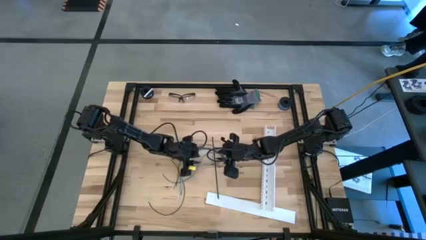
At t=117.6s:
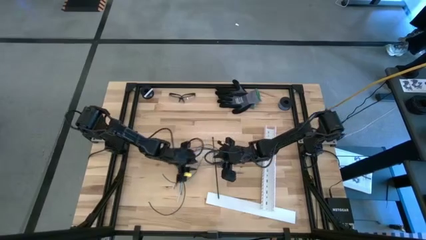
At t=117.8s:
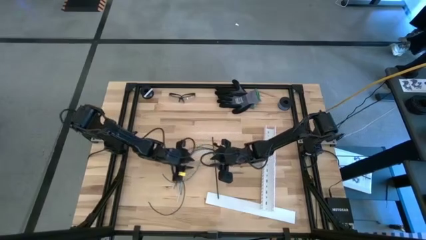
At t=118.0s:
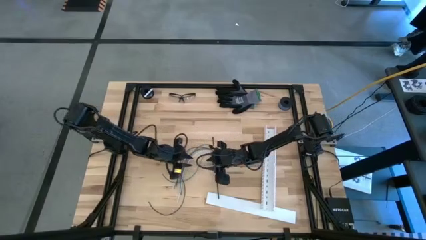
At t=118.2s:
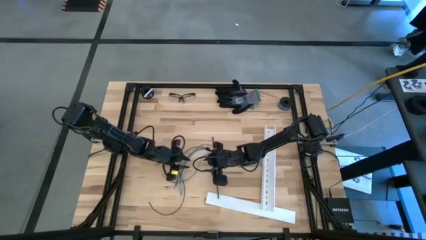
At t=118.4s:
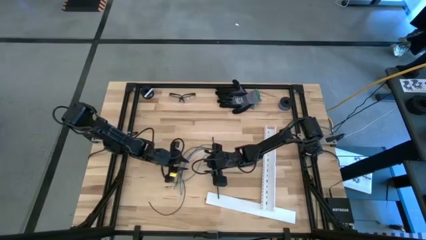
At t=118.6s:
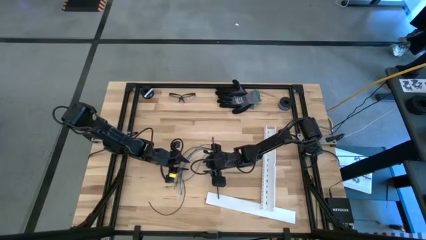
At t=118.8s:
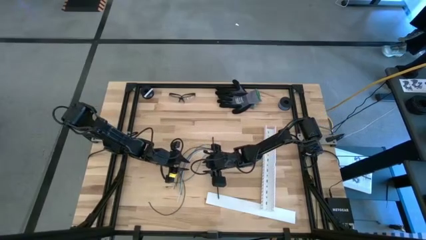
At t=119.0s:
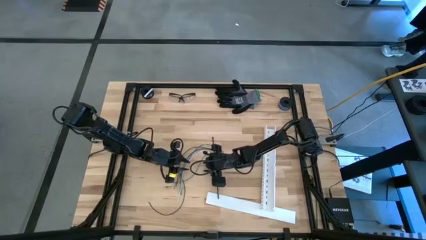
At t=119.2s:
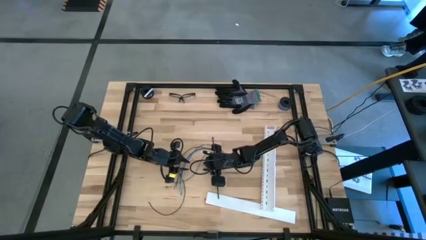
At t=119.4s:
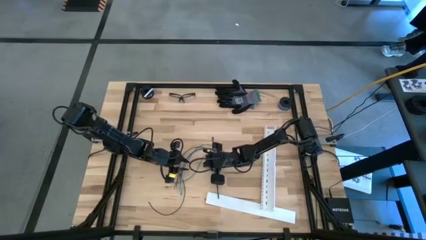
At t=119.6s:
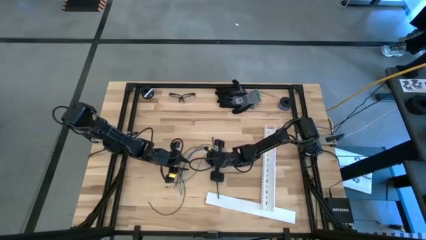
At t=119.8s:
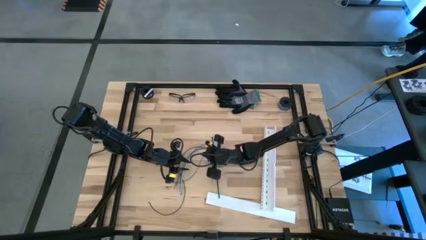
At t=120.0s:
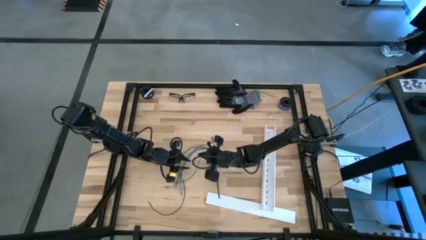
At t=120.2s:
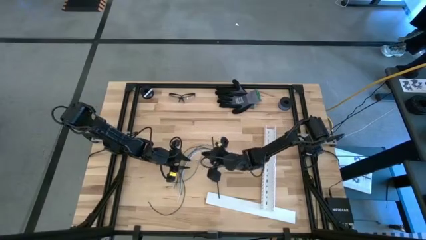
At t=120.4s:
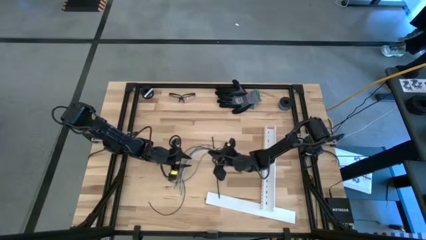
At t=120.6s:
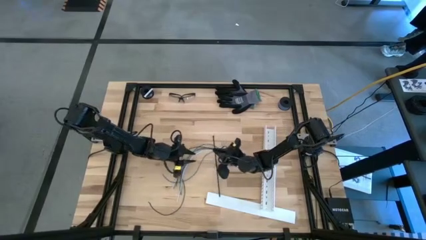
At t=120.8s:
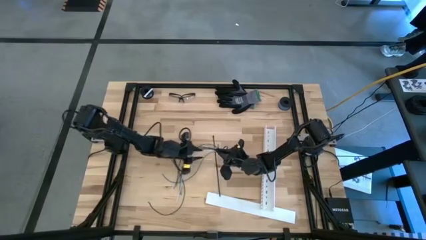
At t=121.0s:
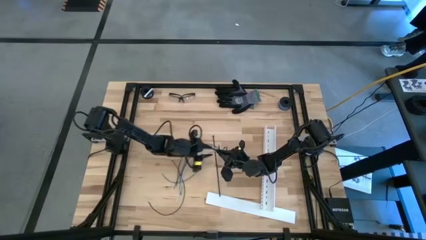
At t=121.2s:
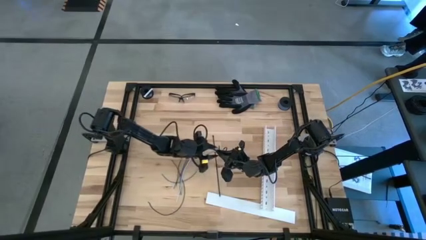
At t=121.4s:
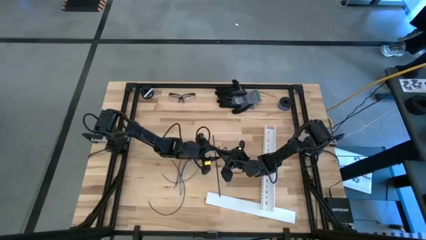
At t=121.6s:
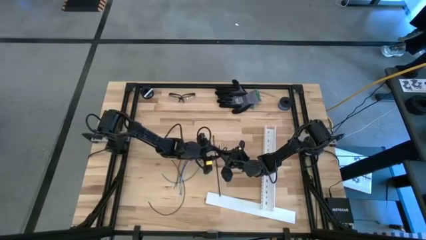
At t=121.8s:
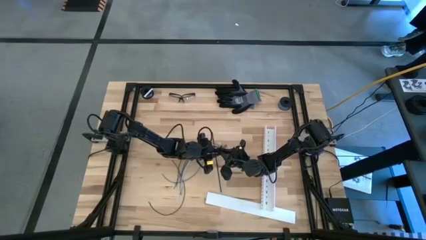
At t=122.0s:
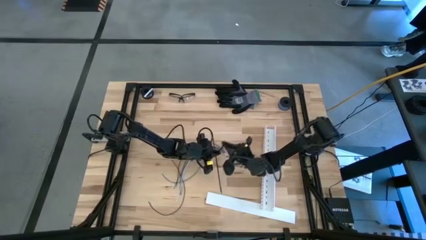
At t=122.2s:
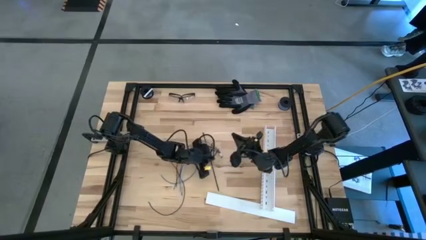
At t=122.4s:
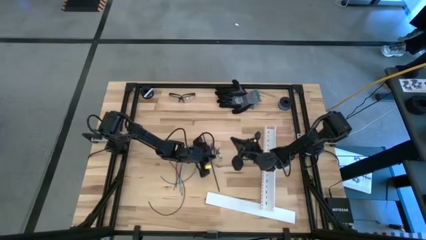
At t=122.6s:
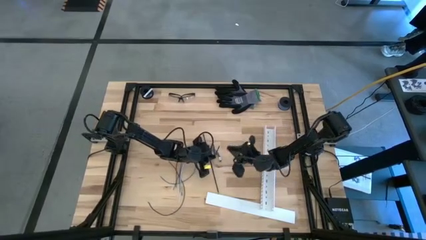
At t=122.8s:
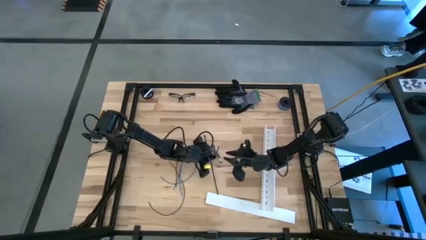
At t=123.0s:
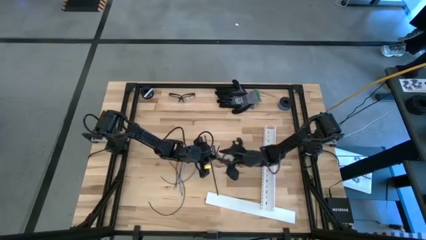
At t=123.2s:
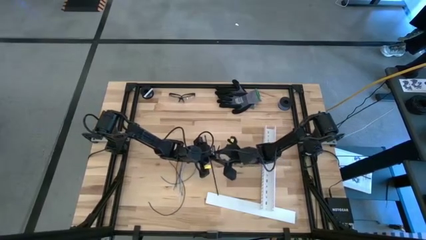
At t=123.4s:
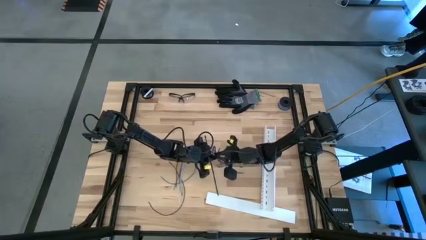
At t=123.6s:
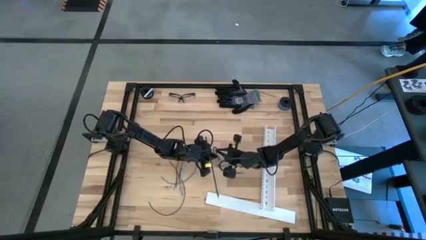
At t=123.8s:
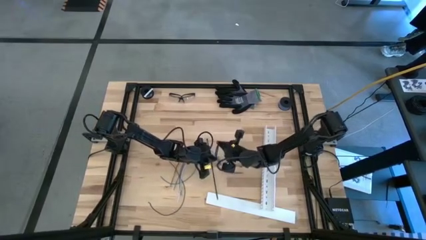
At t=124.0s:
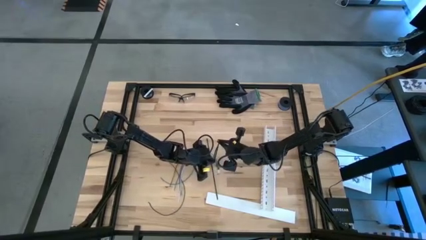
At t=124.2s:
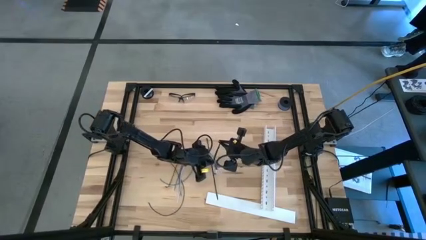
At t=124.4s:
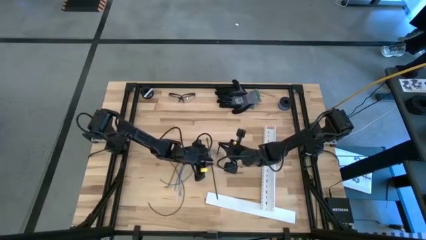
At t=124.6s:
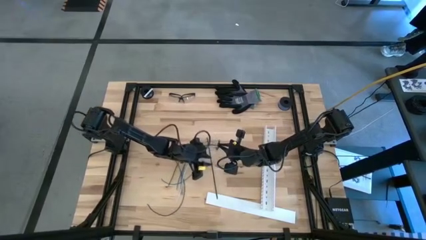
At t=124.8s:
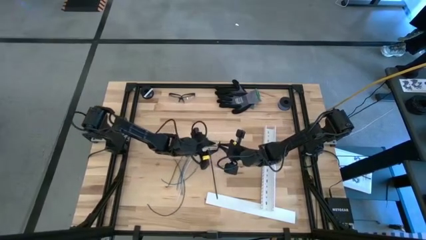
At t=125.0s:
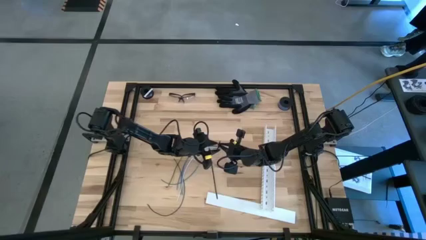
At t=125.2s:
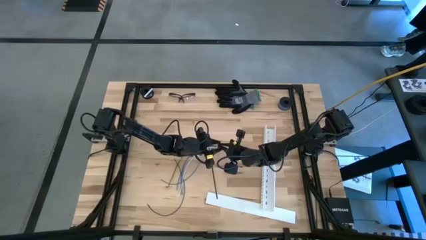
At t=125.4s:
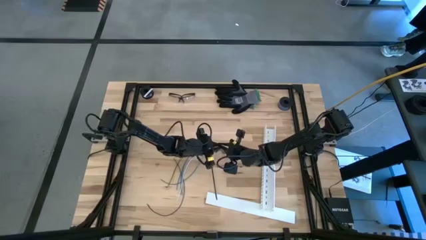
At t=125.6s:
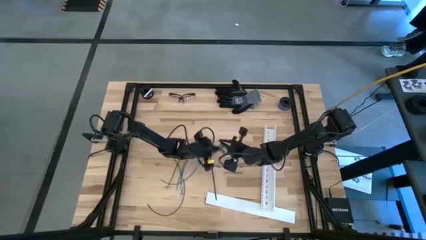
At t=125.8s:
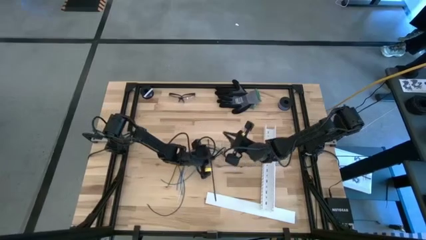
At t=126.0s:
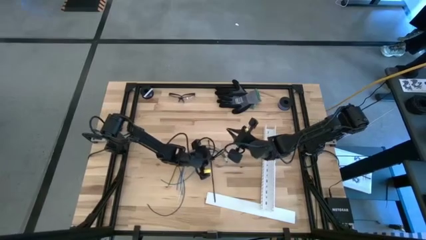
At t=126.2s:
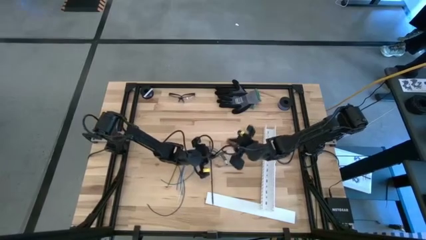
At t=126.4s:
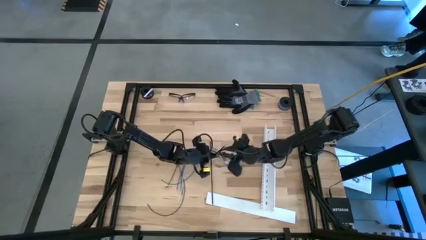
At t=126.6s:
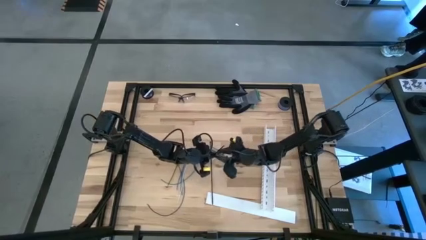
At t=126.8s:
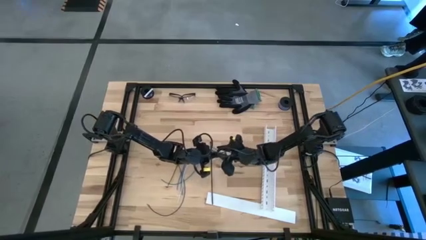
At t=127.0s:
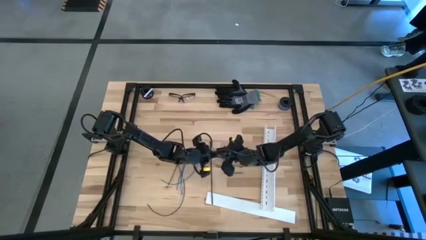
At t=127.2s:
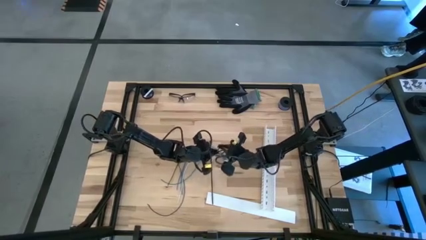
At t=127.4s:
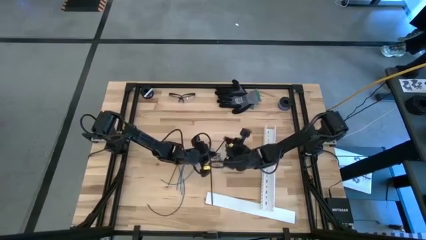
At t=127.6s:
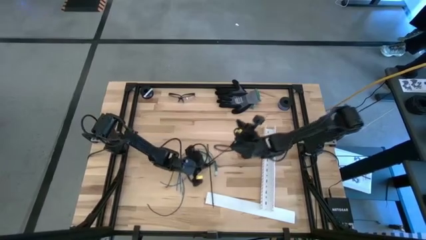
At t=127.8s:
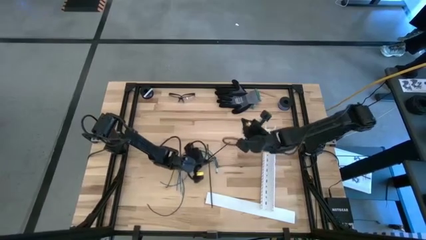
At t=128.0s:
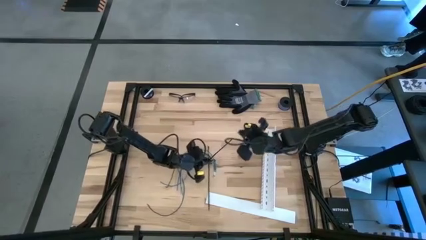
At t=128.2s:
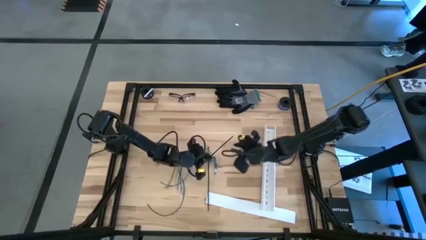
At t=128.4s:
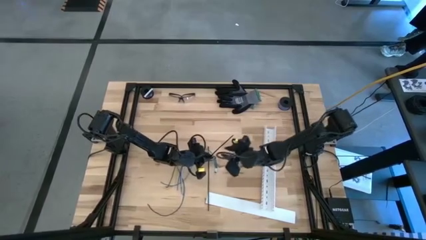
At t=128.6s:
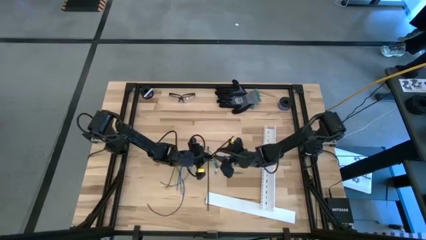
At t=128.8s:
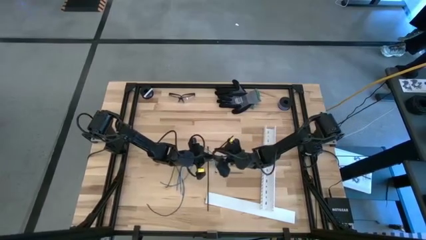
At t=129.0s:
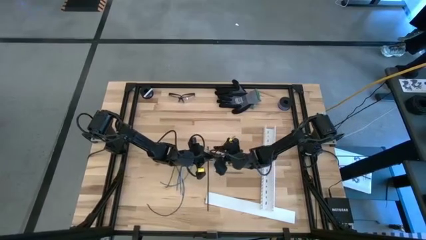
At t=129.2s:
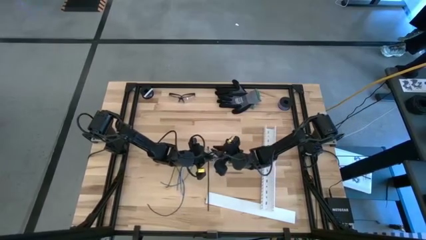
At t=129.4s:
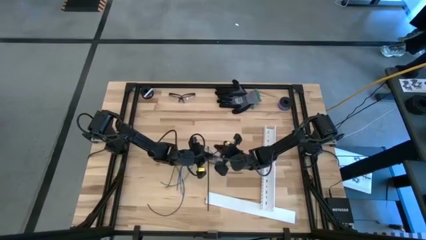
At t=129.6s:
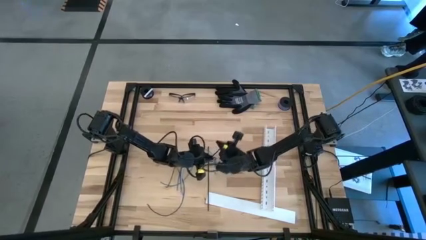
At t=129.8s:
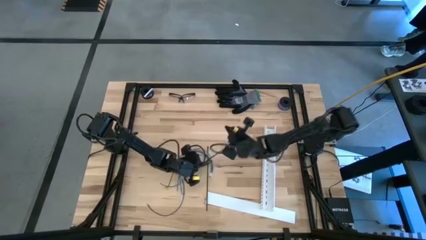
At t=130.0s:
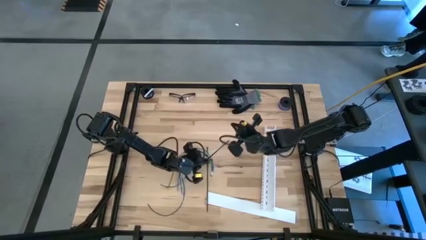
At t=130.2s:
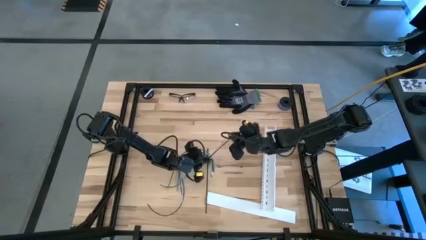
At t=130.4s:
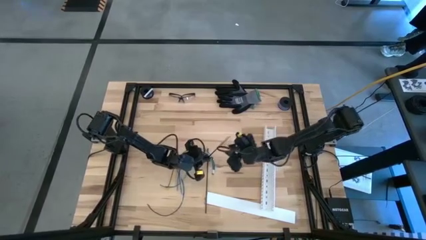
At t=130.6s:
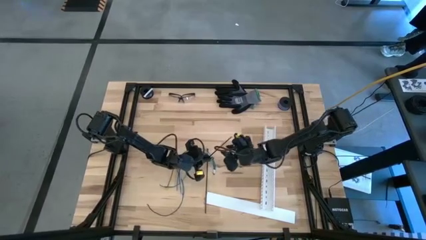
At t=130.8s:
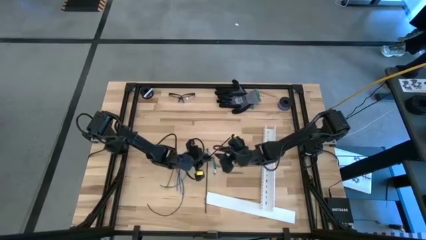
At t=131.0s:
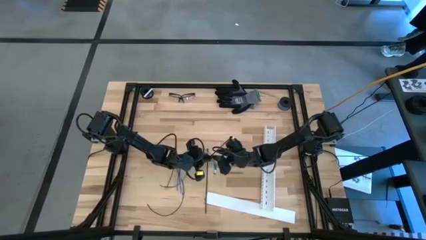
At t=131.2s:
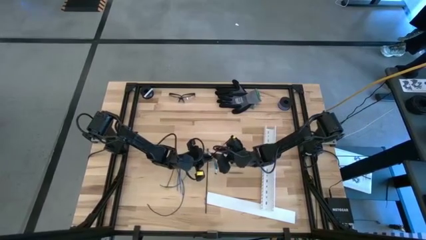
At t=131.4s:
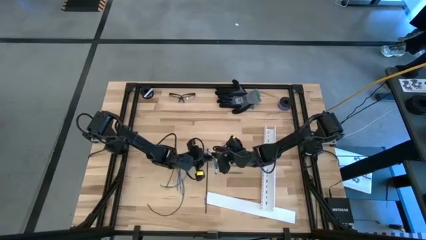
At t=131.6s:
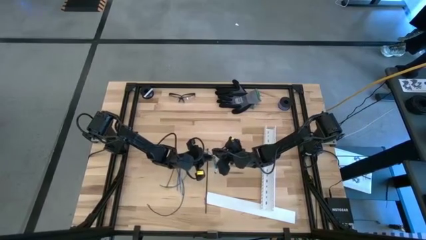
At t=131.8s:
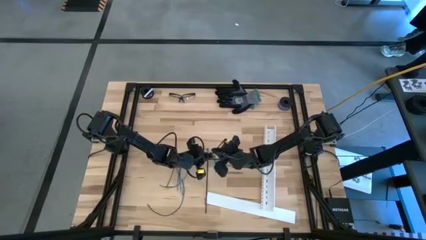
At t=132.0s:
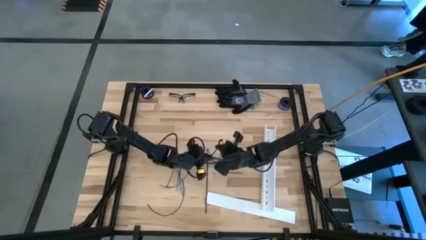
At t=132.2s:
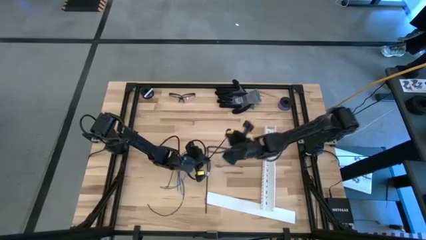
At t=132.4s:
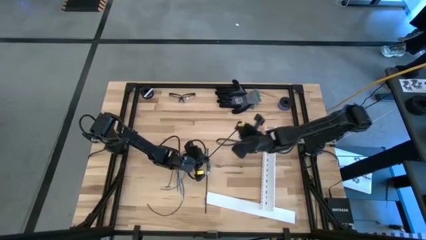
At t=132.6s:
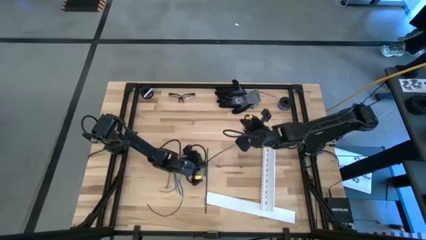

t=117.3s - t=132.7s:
Task: Ziptie cables
Wrap the cable wires with the black zip tie

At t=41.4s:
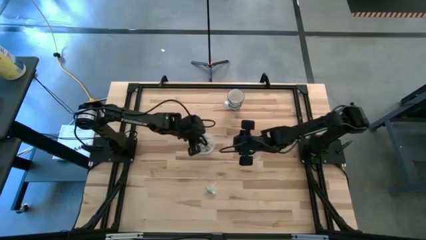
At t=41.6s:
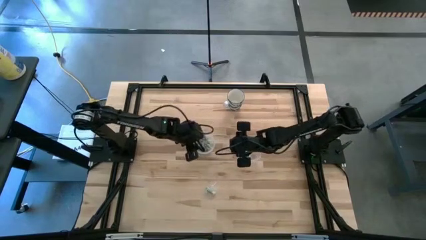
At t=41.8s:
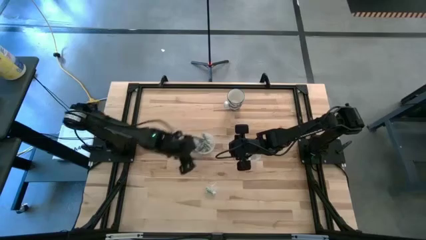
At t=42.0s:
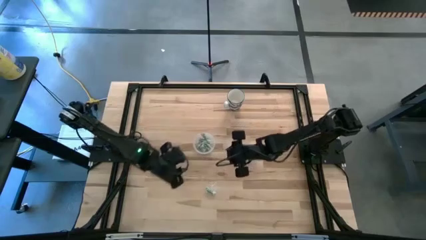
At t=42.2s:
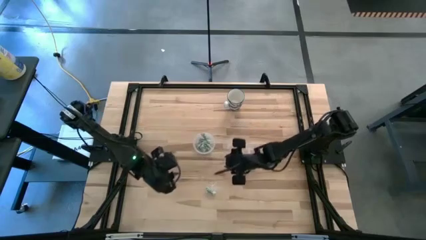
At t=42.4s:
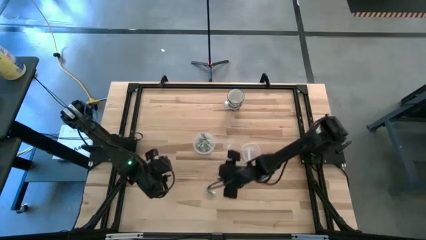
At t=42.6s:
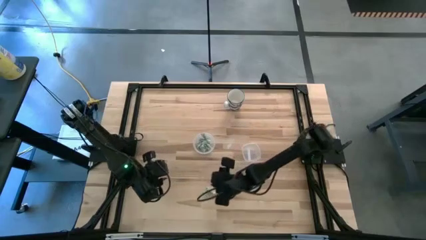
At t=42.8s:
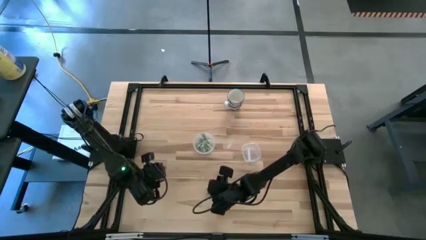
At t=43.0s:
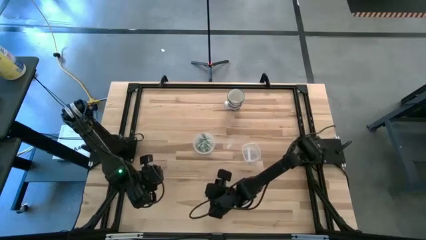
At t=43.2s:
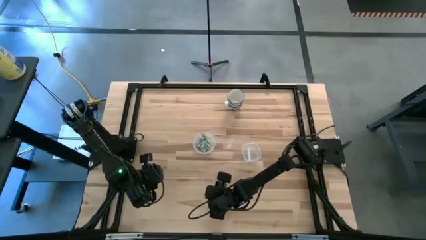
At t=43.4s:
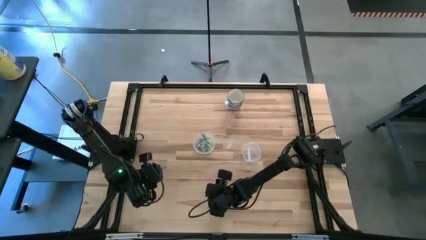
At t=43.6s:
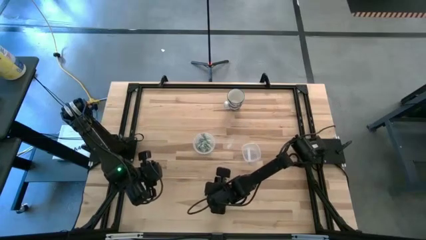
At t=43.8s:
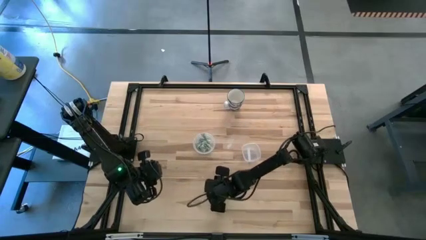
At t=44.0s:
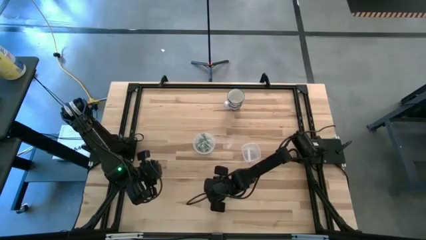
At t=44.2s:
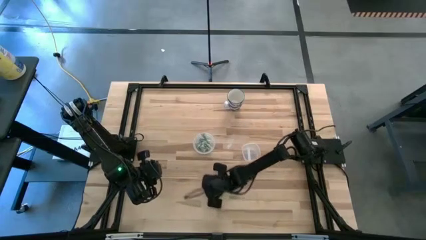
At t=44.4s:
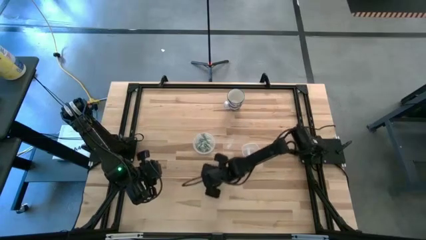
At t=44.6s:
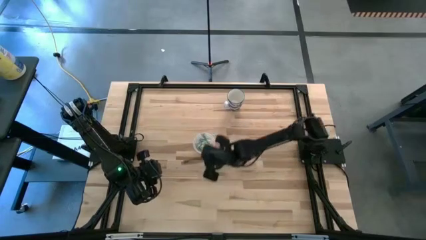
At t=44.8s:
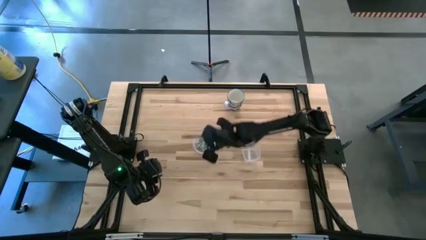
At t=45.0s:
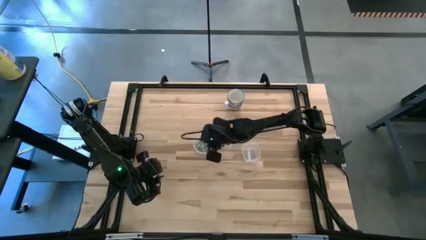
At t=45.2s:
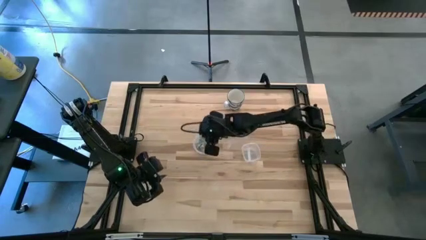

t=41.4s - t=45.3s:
Task: Pick and place Stevia / Truvia into bins
Put the green stevia packet into the left transparent container
